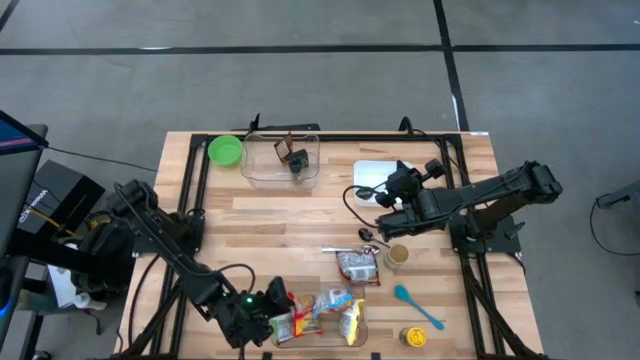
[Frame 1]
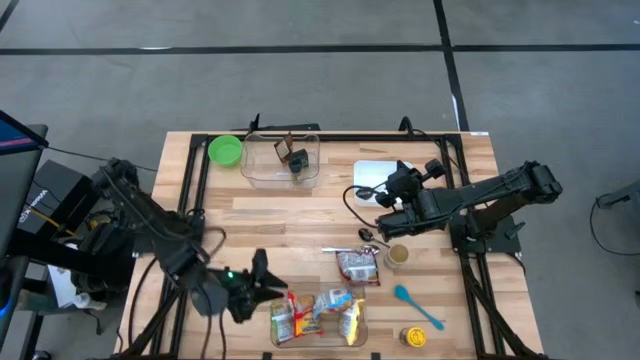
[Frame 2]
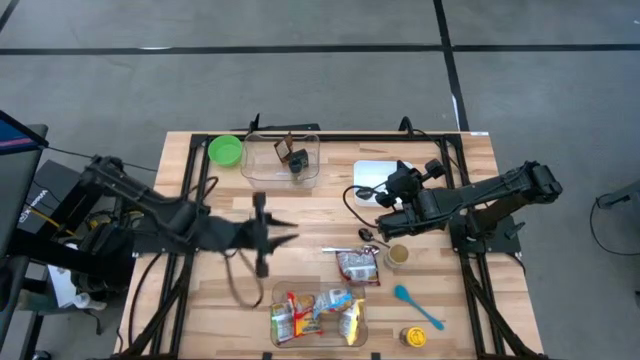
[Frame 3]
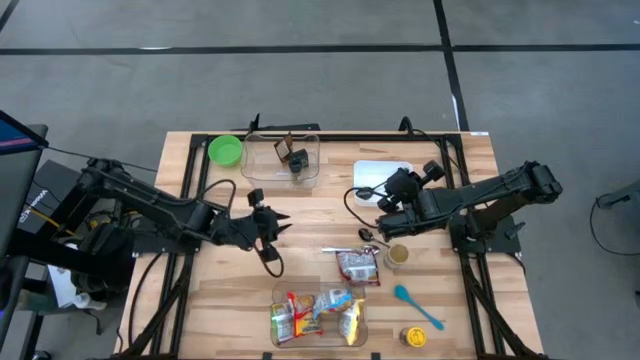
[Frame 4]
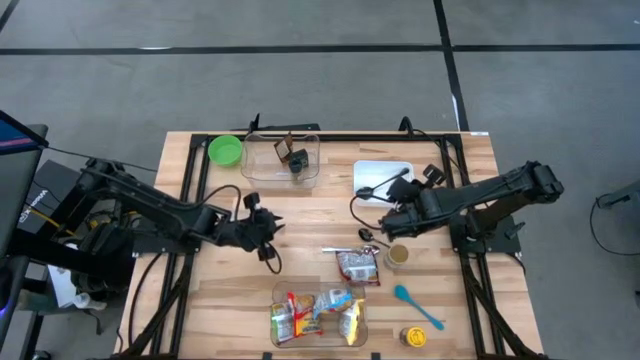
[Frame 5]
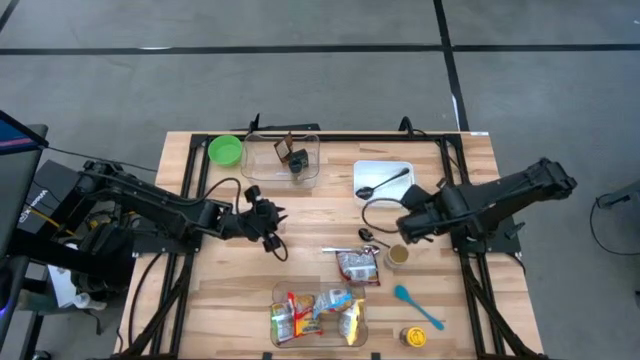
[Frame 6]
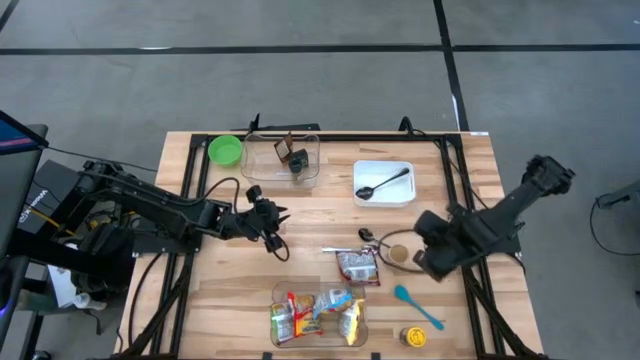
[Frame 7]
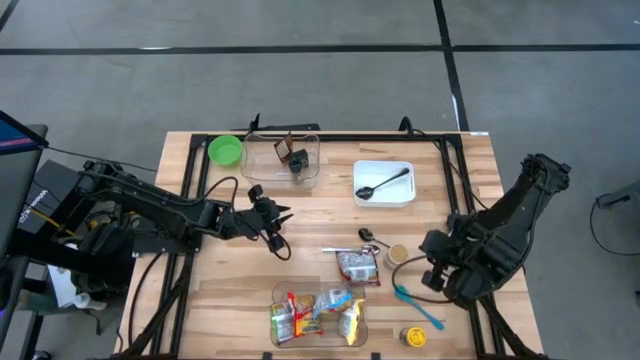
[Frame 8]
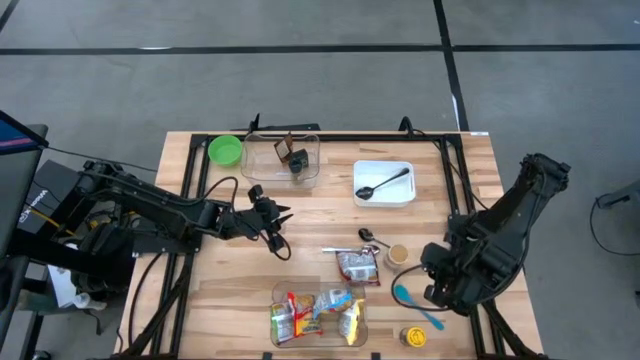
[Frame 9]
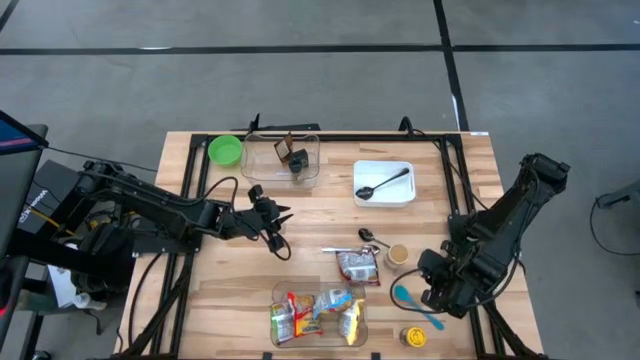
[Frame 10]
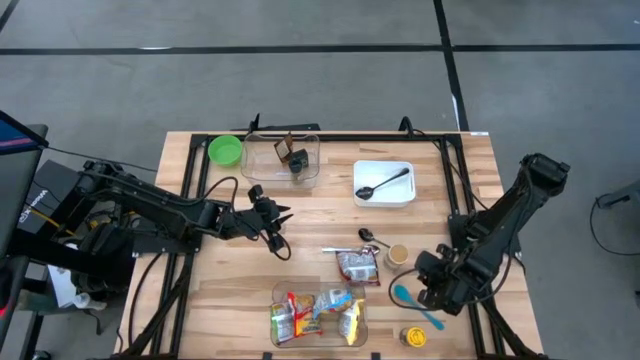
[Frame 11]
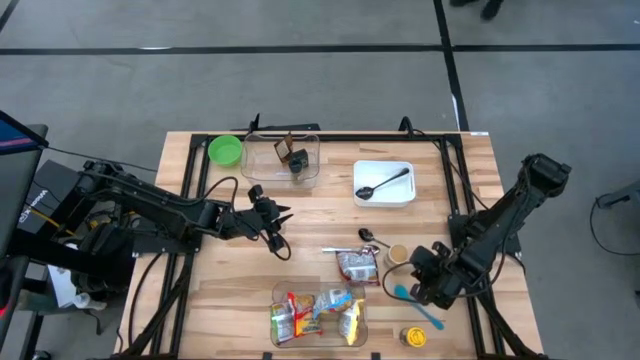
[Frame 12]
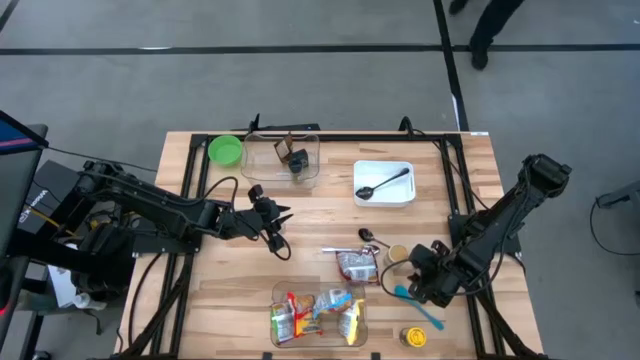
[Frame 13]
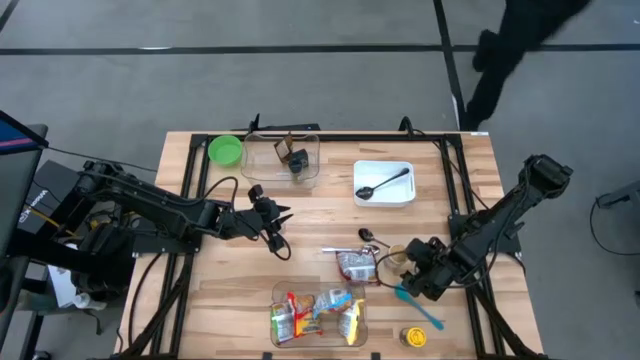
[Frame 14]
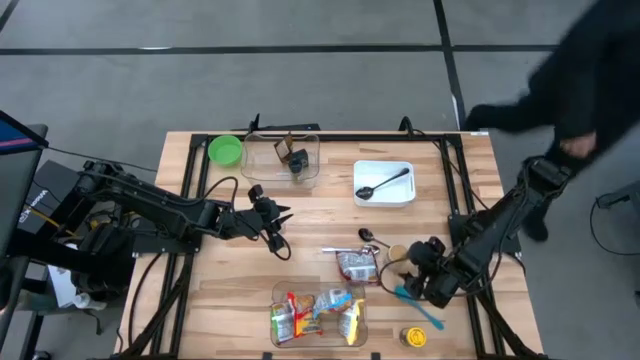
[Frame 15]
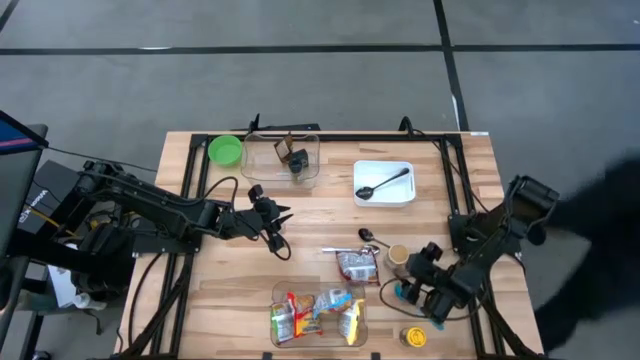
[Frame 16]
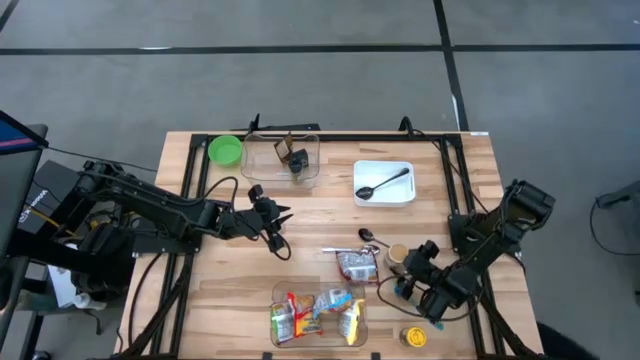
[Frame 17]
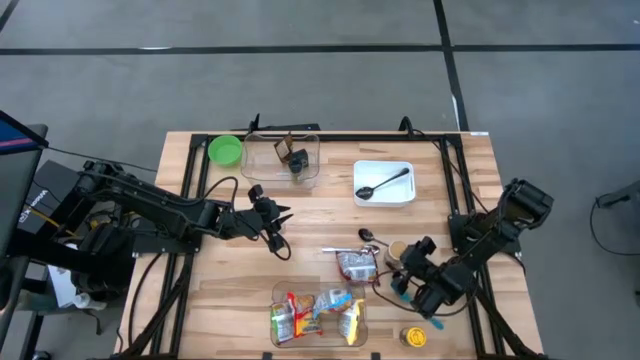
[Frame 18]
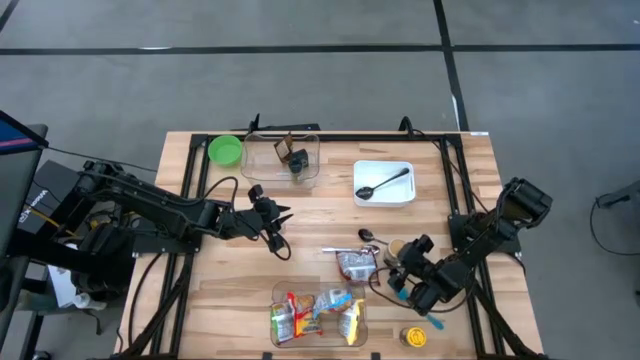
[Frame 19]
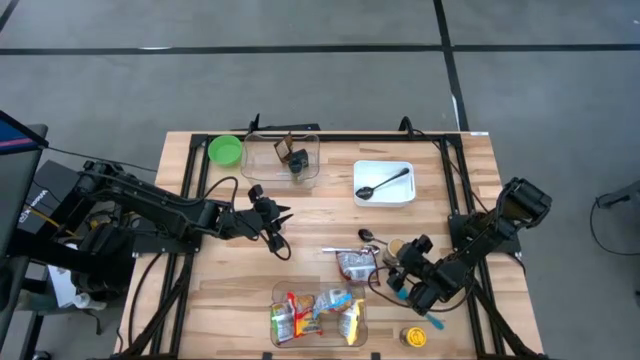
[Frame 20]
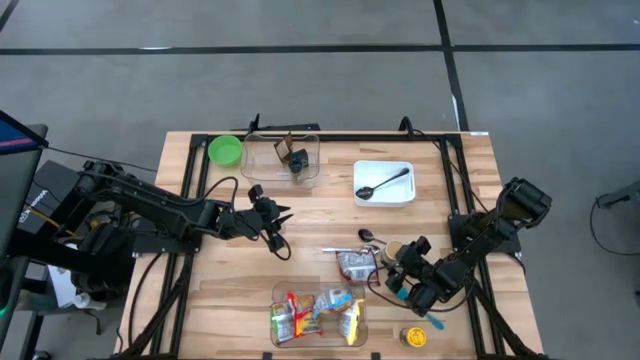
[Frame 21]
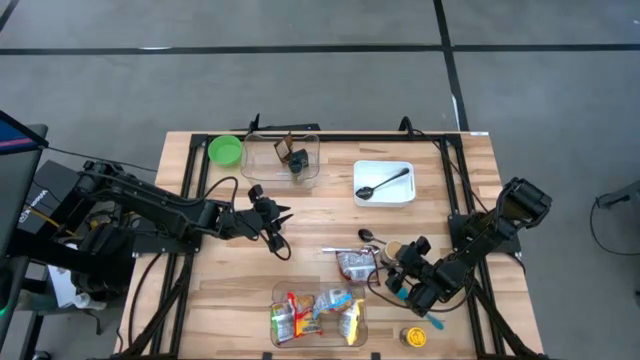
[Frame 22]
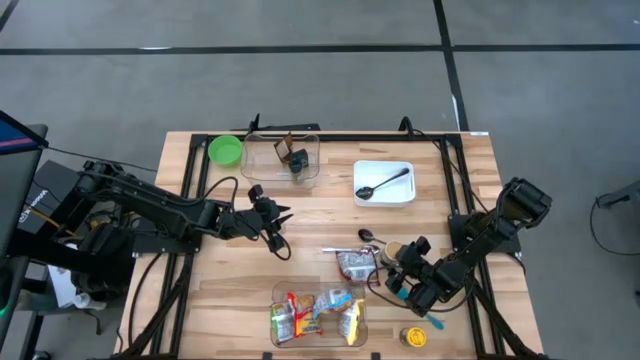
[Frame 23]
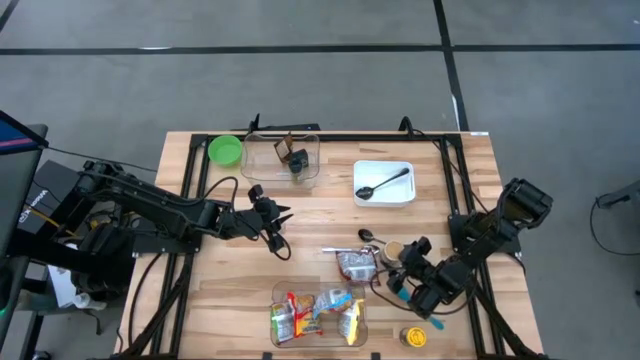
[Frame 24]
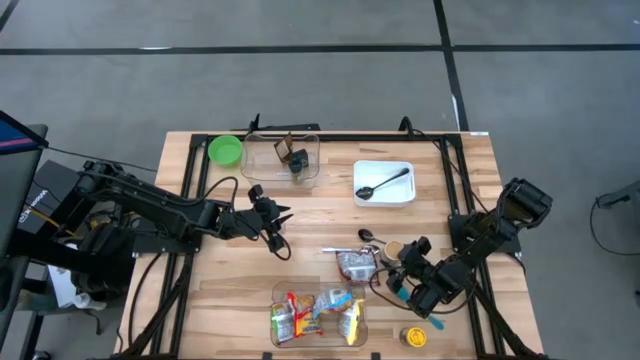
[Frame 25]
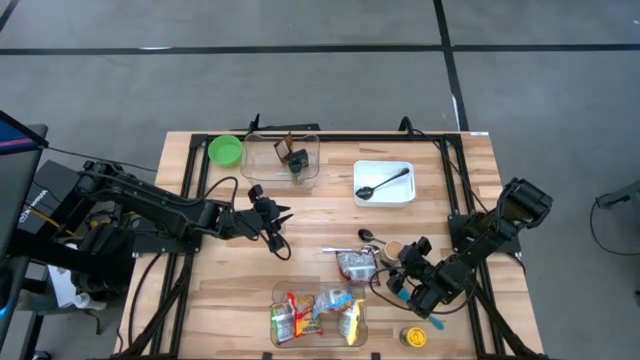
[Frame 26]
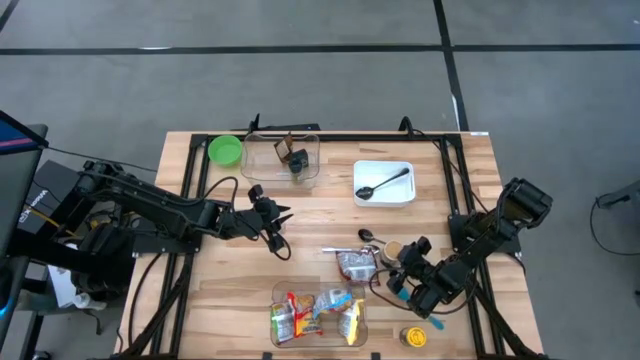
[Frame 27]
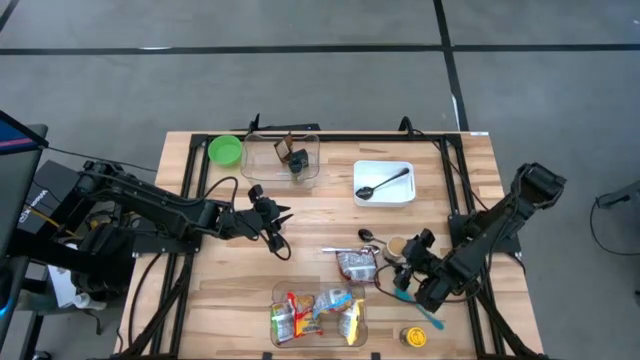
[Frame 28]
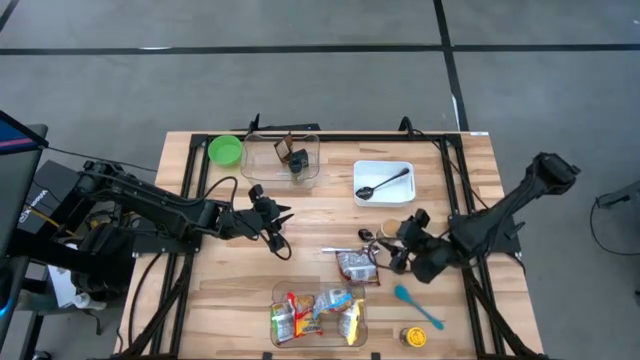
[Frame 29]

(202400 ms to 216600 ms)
Task: Pick & Place Food Item
Put the gold seasoning bottle into the top transparent bin

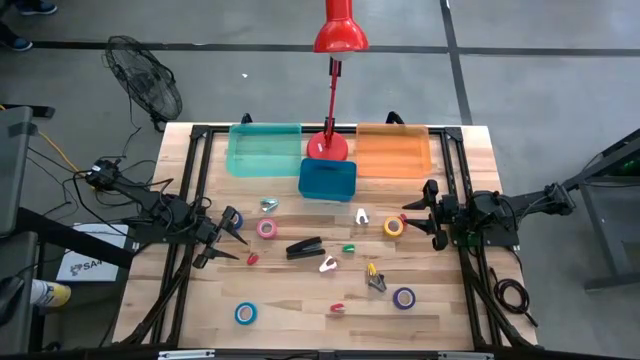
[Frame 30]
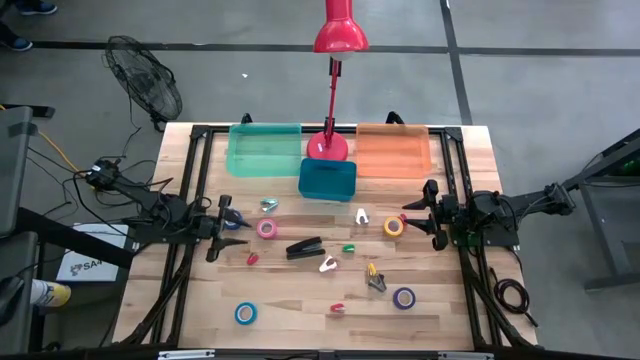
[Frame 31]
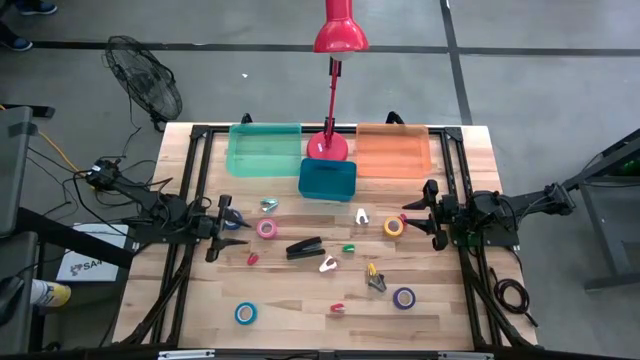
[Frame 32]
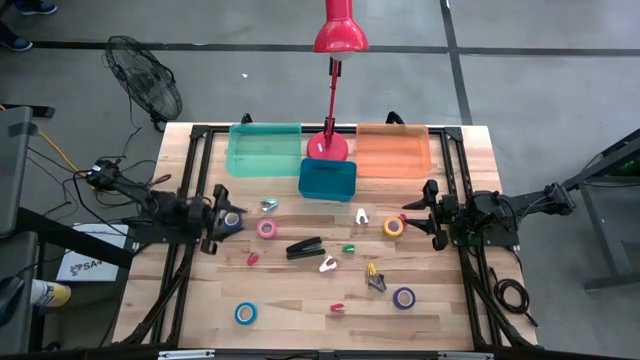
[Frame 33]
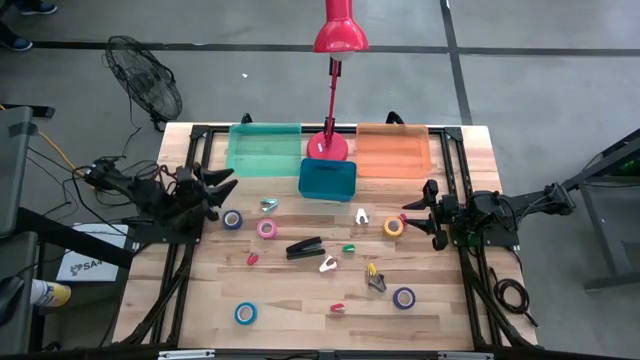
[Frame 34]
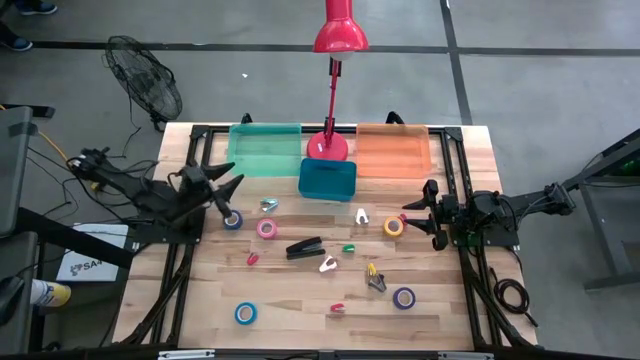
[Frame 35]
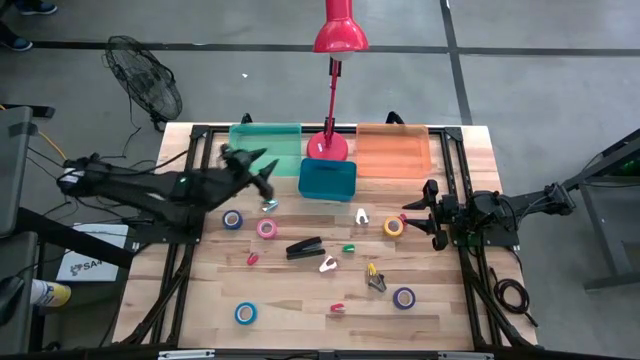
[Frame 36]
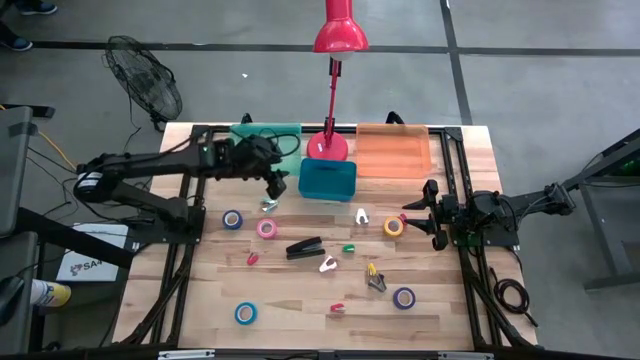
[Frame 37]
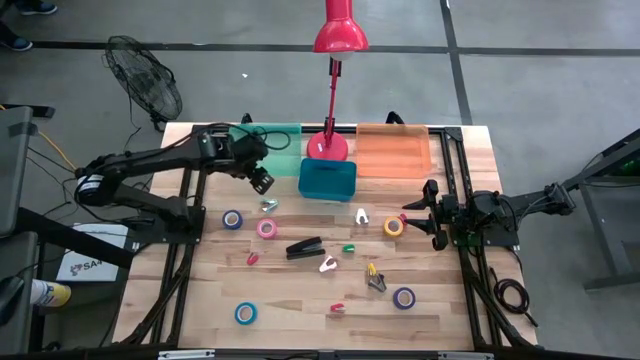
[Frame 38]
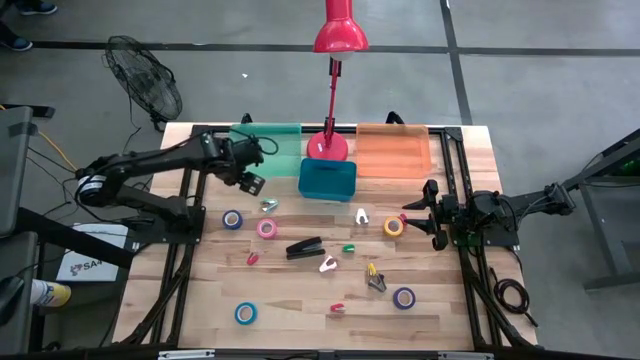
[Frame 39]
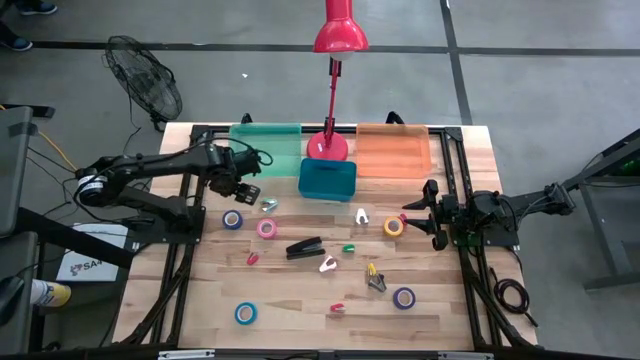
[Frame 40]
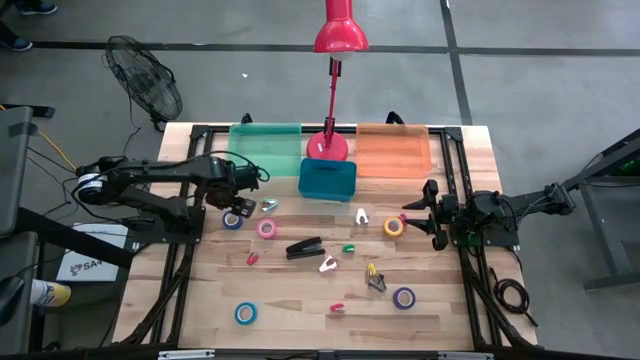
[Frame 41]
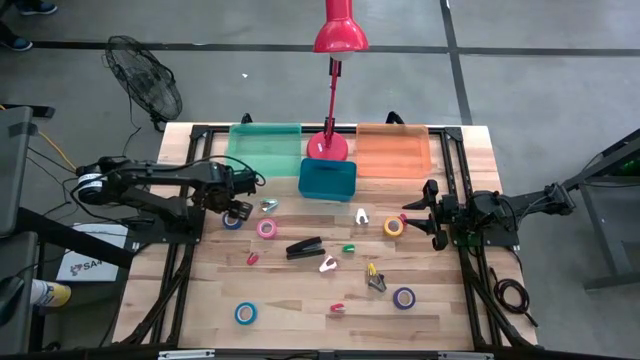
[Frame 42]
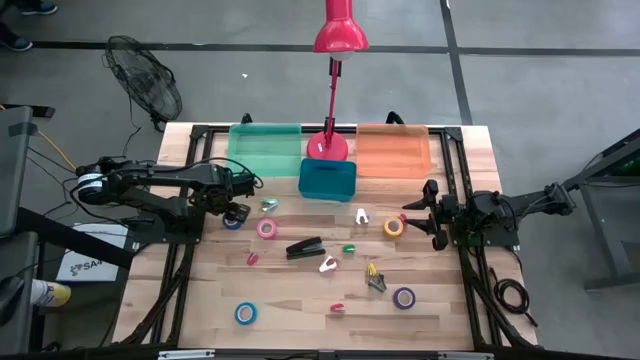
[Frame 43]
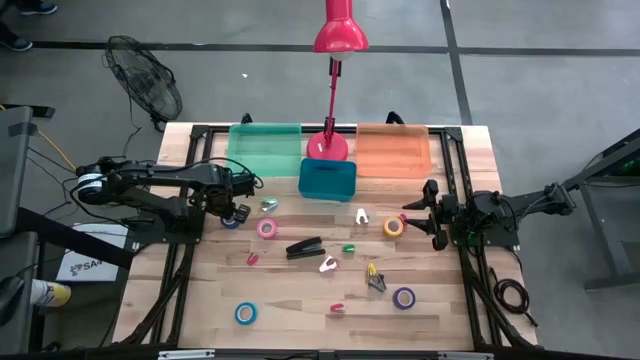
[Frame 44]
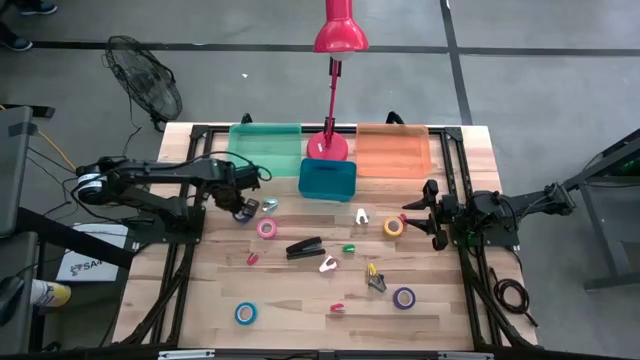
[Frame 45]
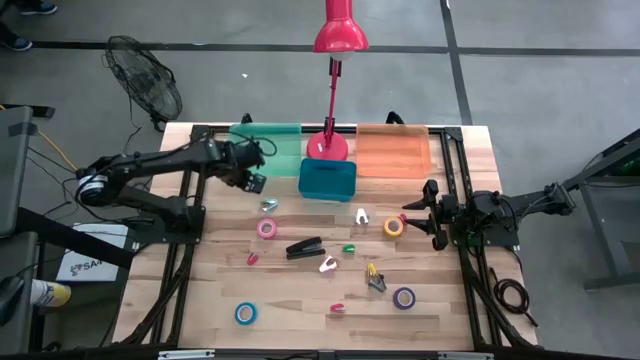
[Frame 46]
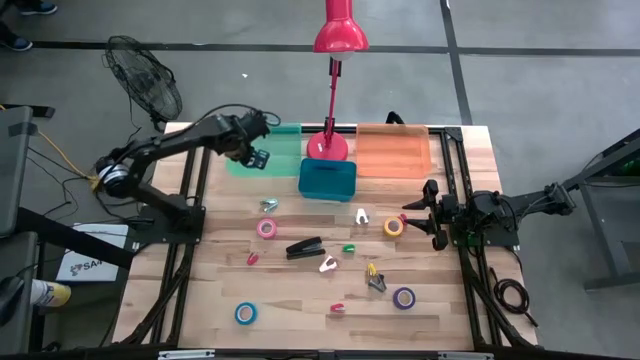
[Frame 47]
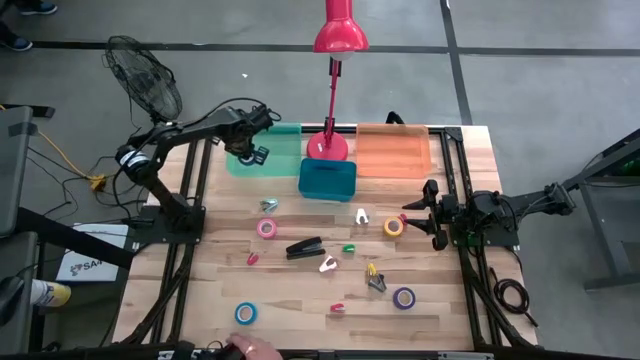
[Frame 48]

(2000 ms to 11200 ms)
Task: Pick and place Stapler, Stapler remover, tape
Put the top dark blue tape into the light green bin
